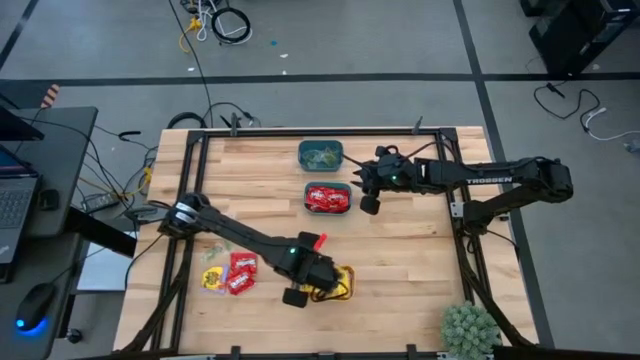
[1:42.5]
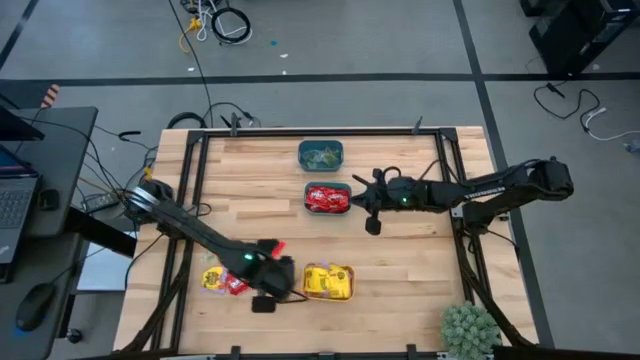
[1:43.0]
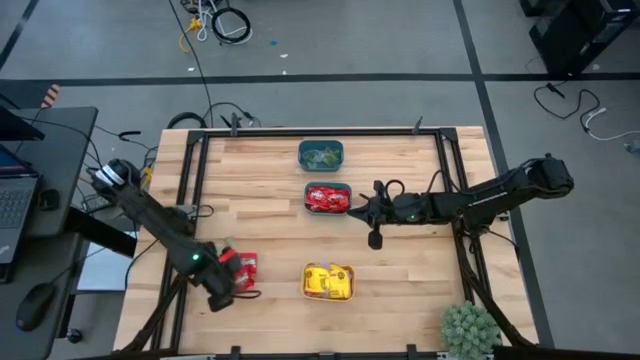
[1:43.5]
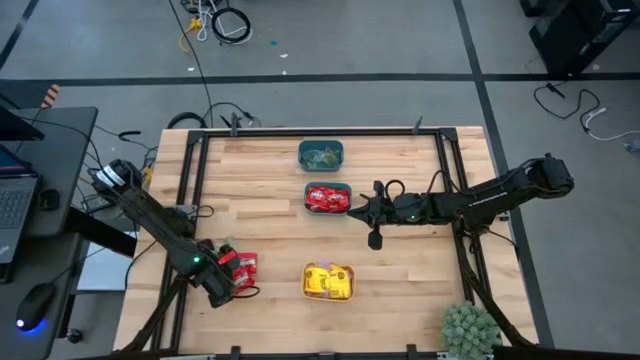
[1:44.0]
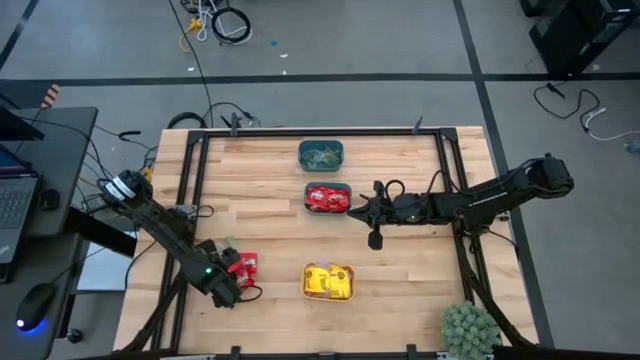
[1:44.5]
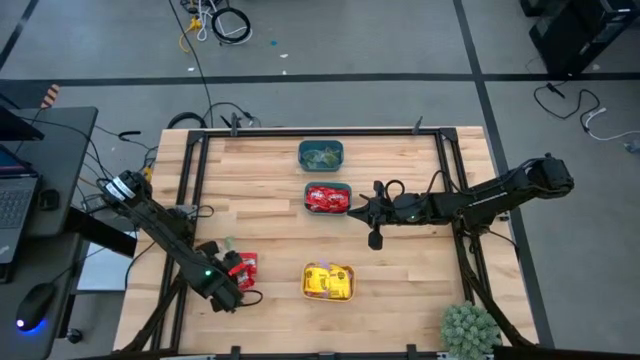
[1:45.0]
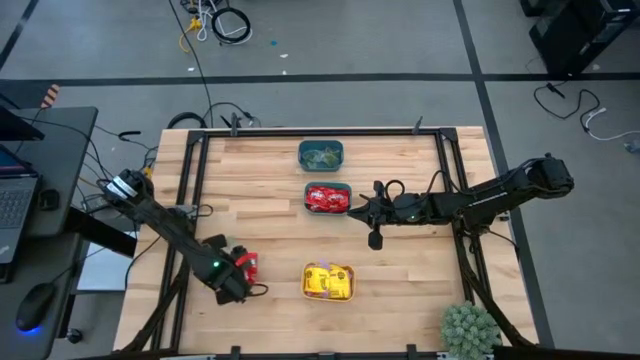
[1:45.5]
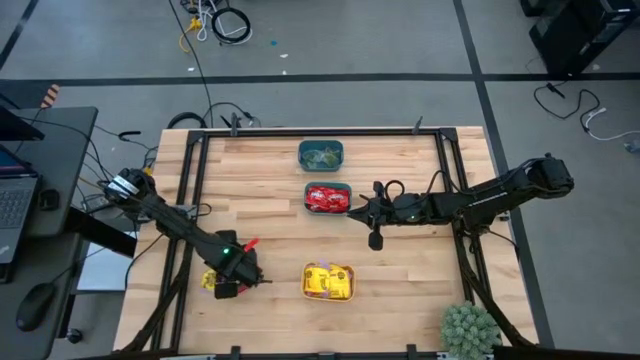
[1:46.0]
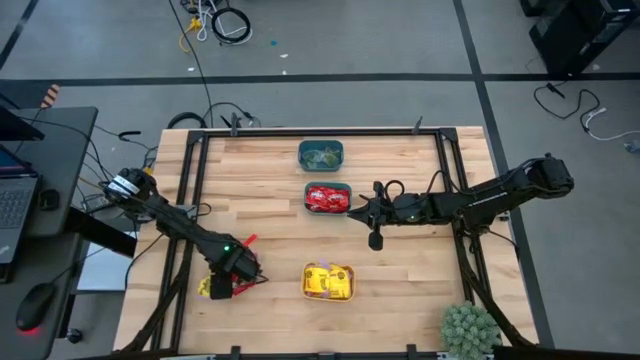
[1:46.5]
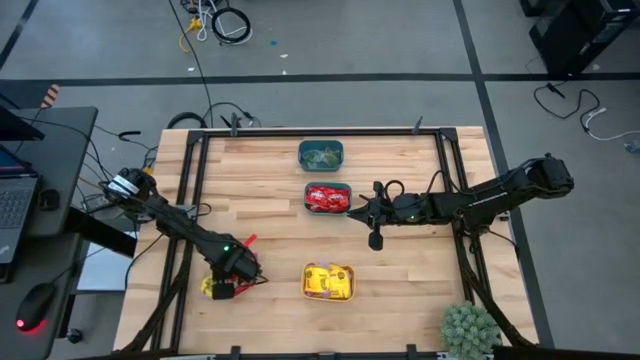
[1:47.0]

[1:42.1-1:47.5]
Task: Sort candy
Put the yellow candy into the yellow bin

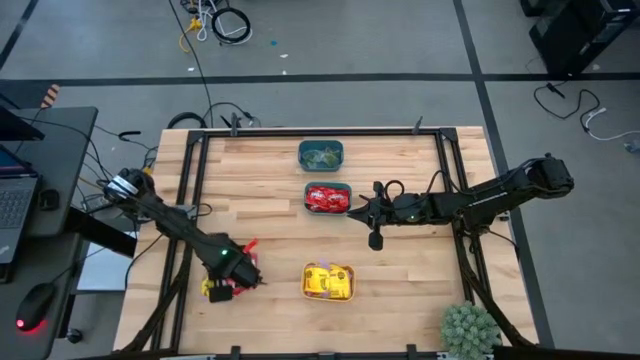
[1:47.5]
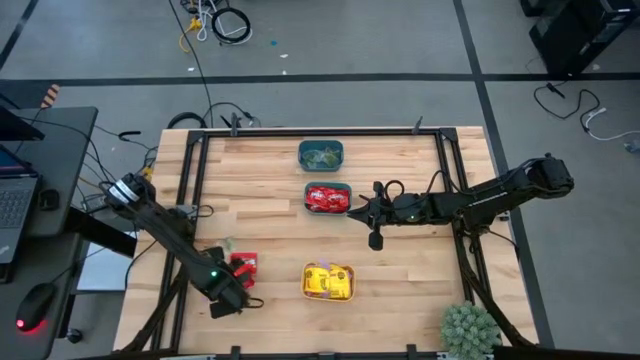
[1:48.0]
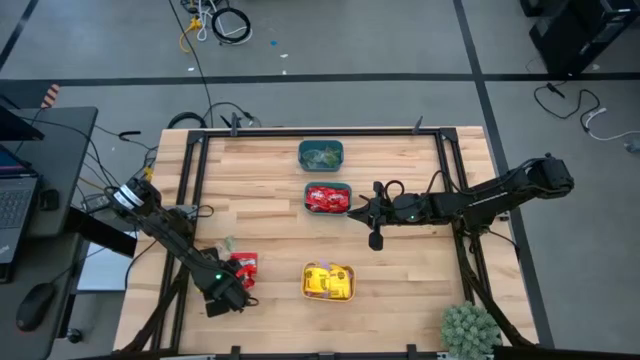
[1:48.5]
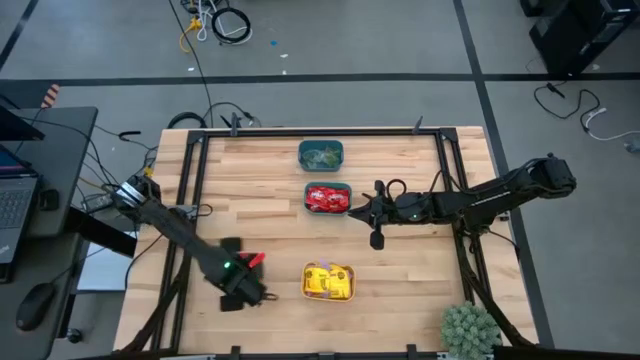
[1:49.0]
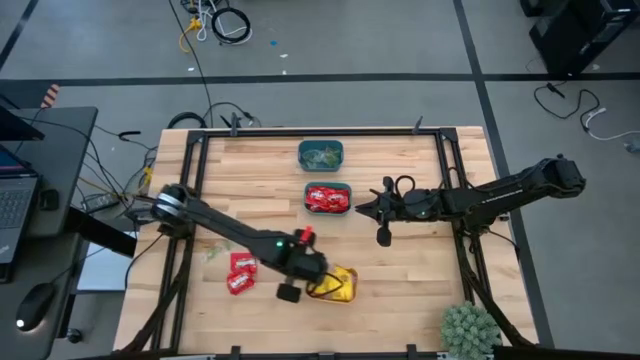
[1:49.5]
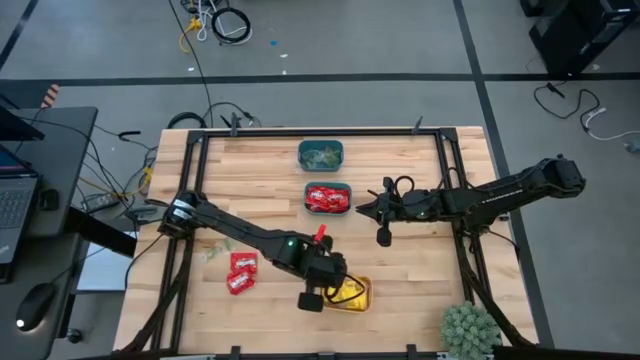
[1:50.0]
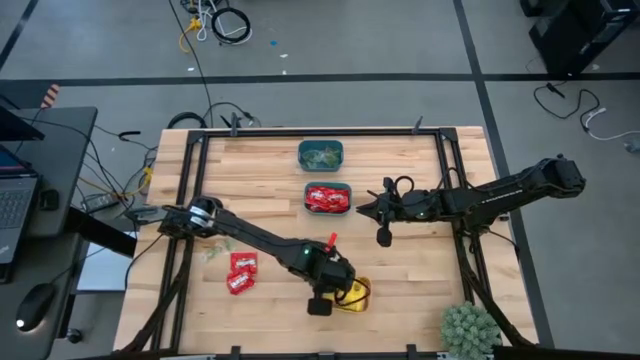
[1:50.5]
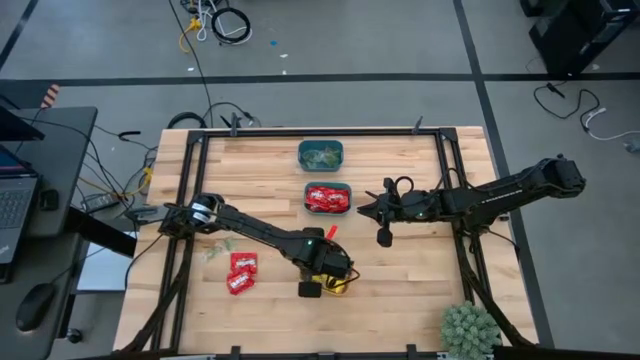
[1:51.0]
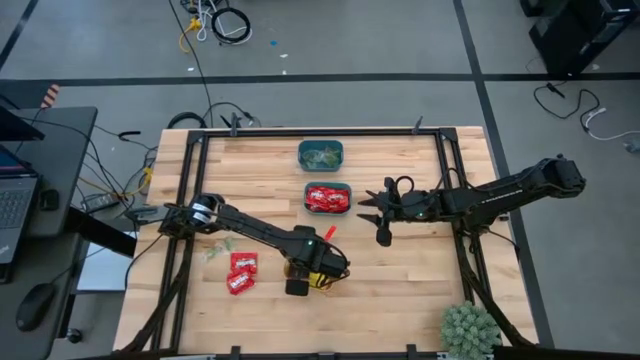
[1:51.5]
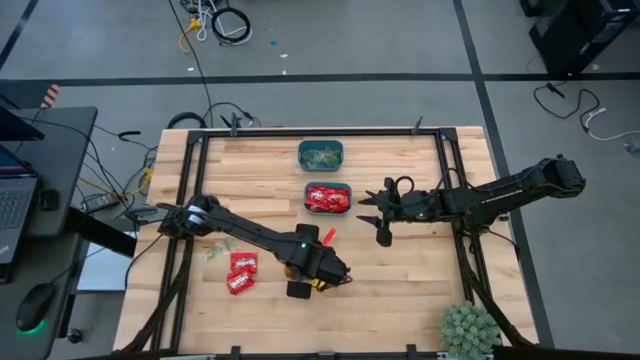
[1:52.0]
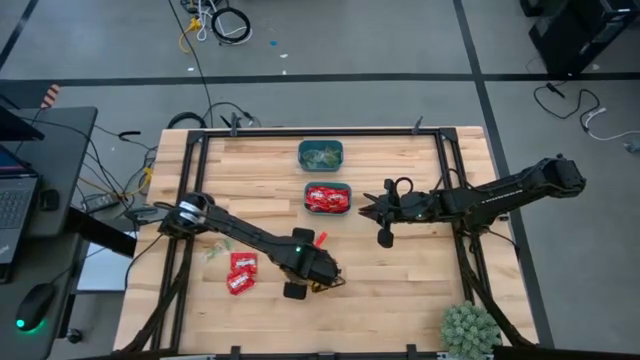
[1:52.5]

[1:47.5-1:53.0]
Put the yellow candy into the yellow bin

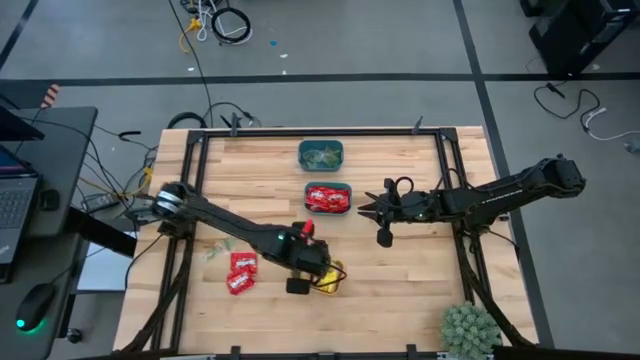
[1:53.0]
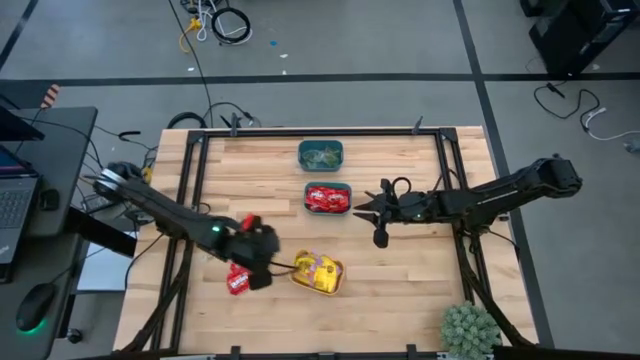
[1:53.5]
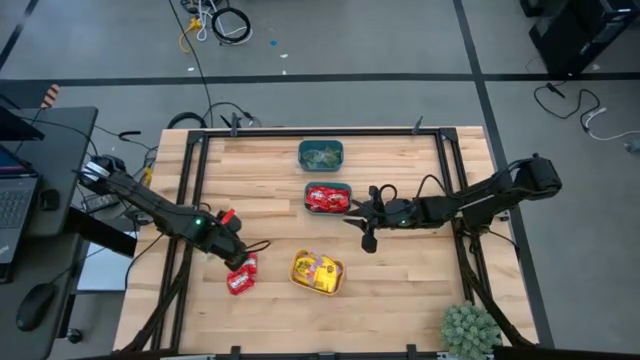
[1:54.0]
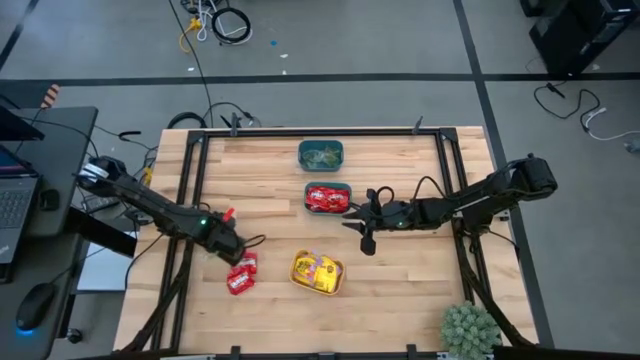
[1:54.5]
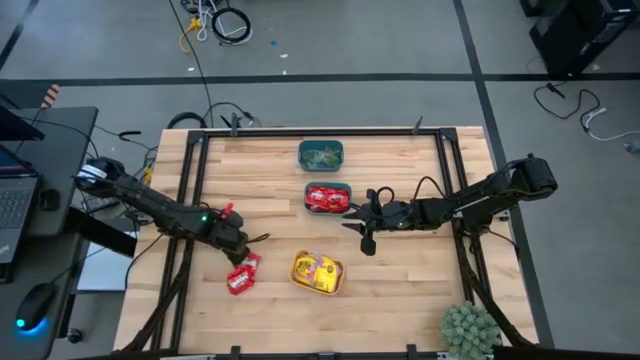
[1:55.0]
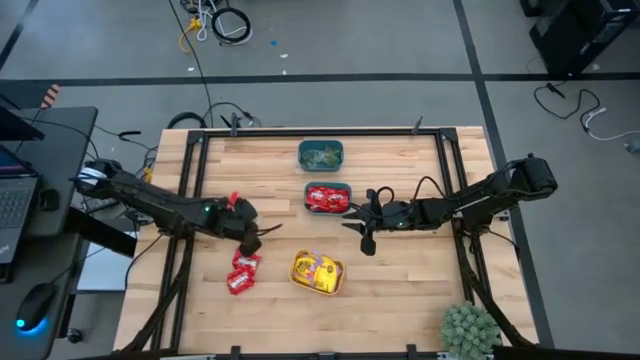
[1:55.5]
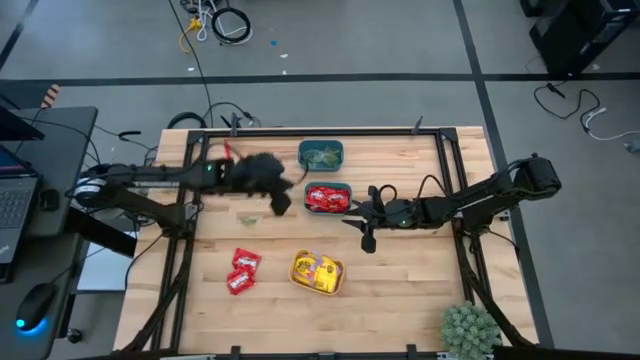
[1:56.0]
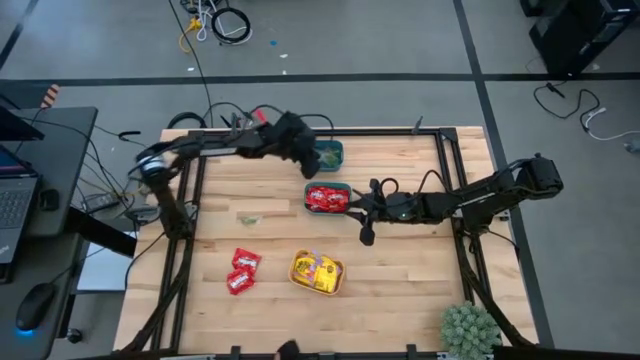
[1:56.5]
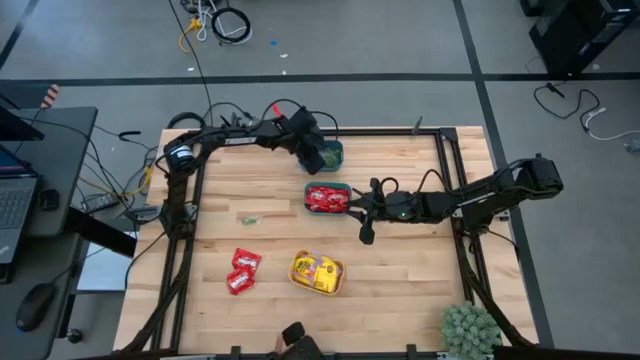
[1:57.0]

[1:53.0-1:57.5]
Put the green gummy into the blue bin

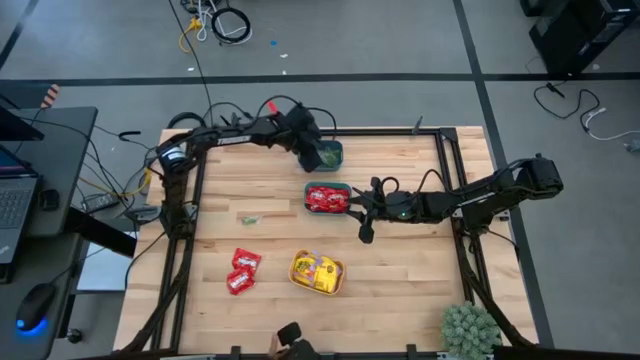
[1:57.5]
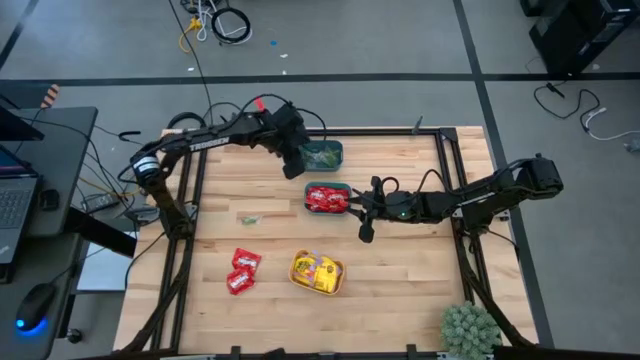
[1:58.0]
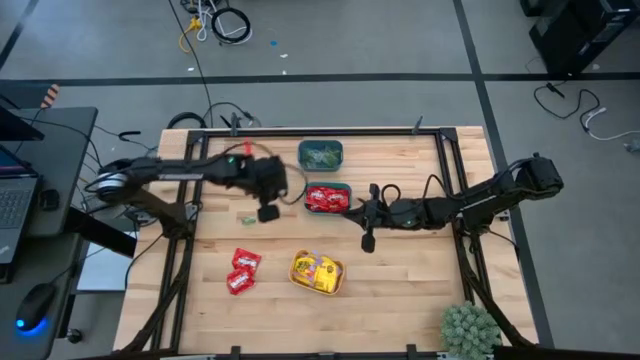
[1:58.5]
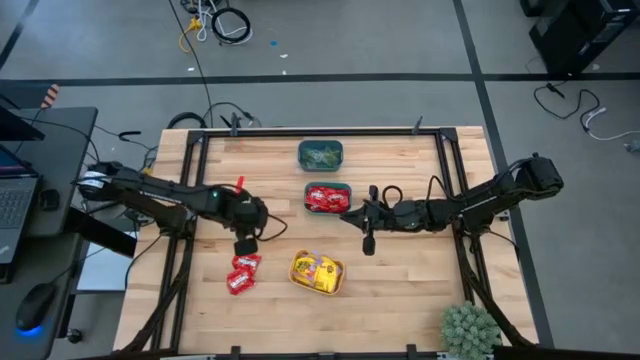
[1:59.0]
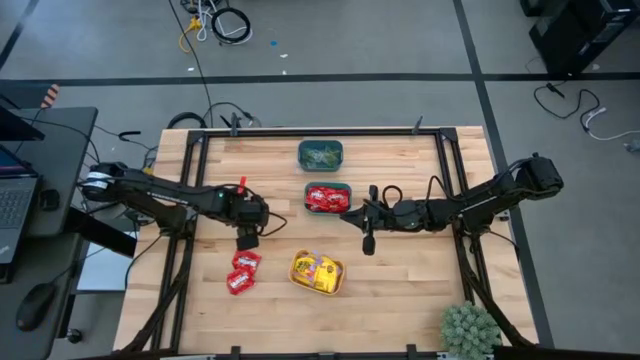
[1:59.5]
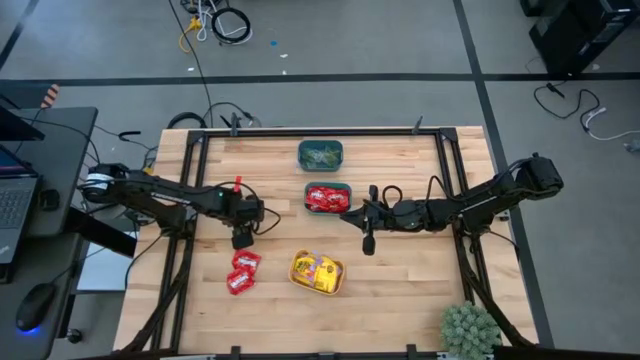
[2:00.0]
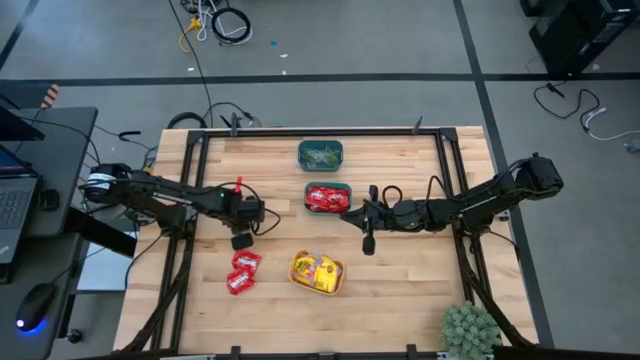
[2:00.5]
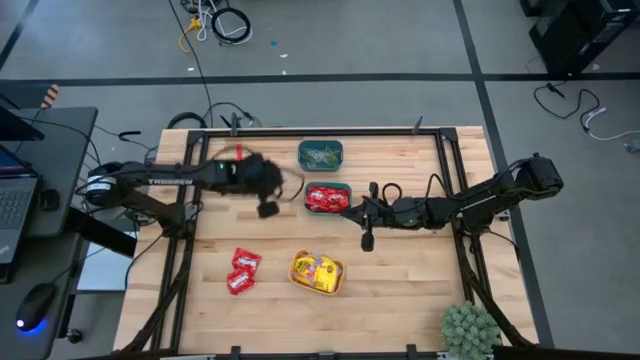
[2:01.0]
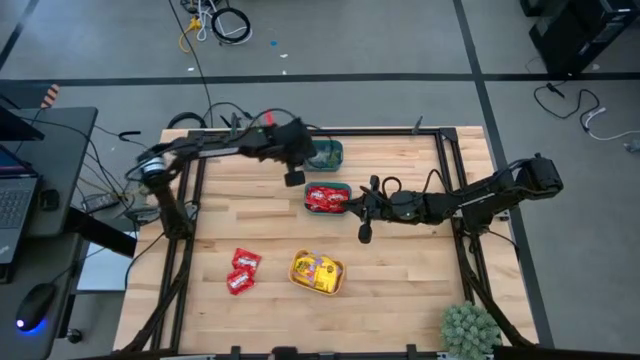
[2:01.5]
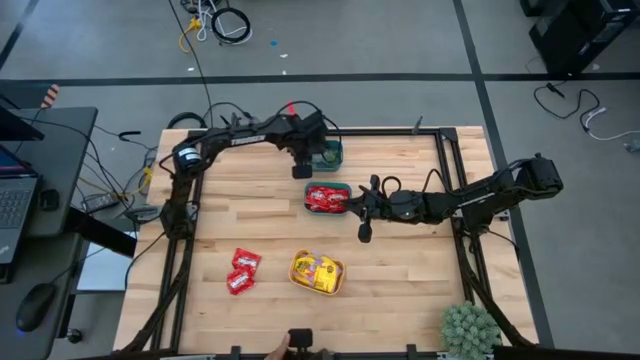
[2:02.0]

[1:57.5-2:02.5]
Put the green gummy into the blue bin

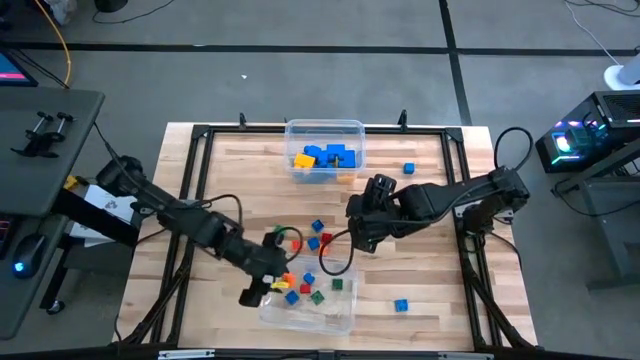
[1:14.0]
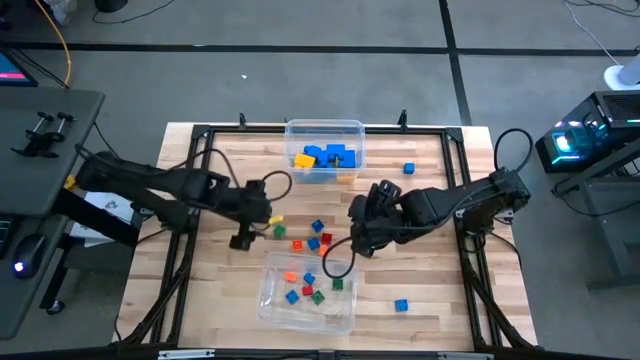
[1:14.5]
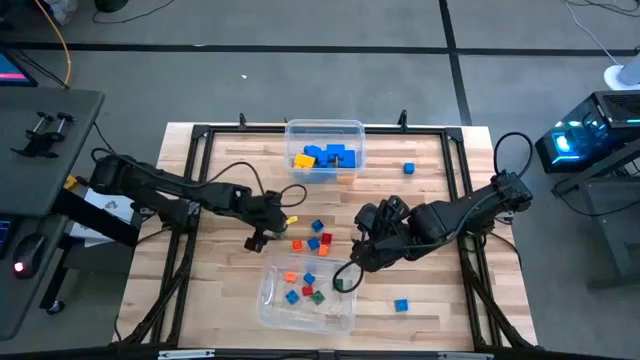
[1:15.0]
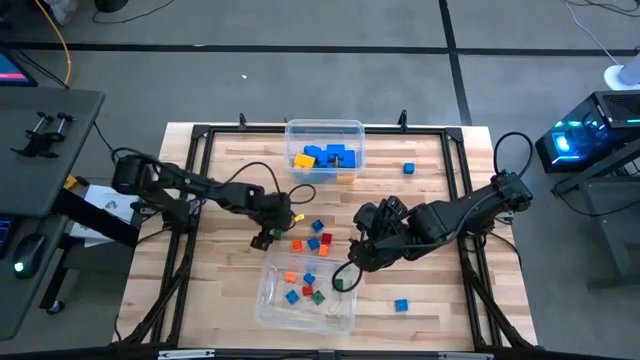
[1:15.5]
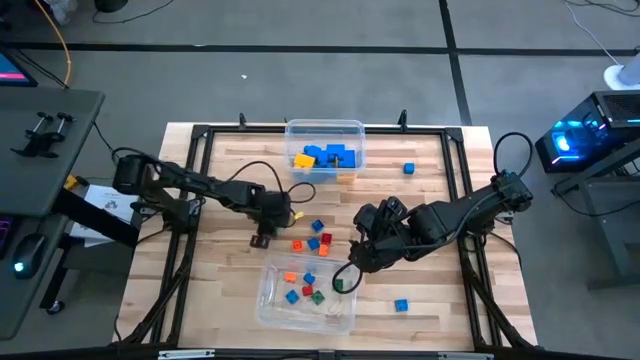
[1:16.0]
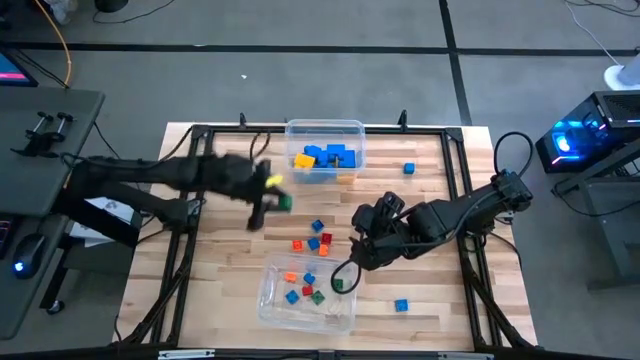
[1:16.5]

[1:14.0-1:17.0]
Task: Sort blocks by size
Put the small green game piece into the bottom transparent bin
